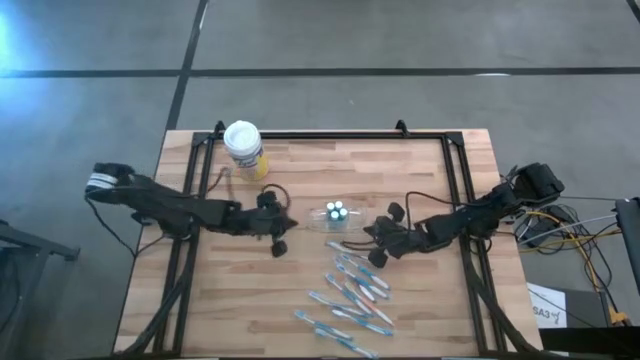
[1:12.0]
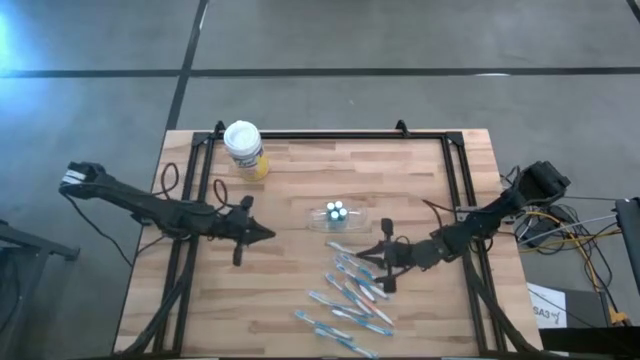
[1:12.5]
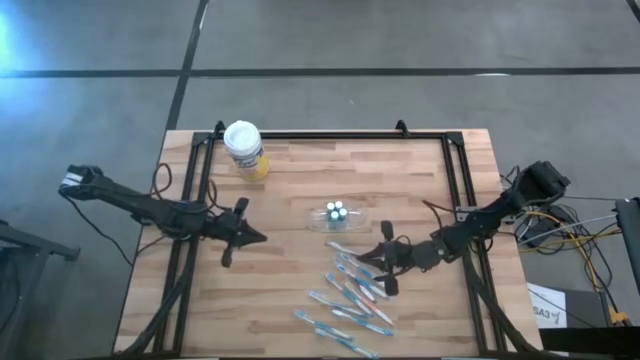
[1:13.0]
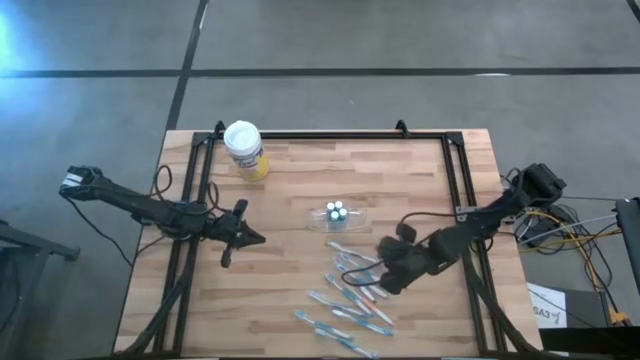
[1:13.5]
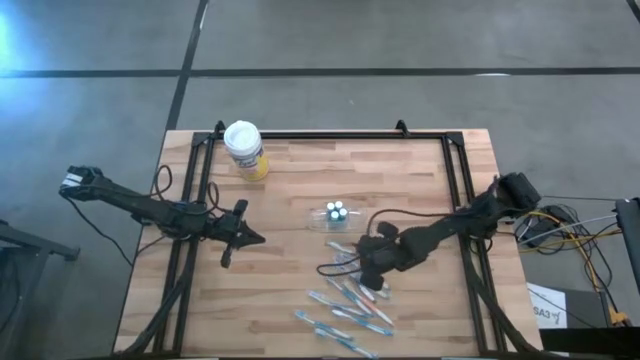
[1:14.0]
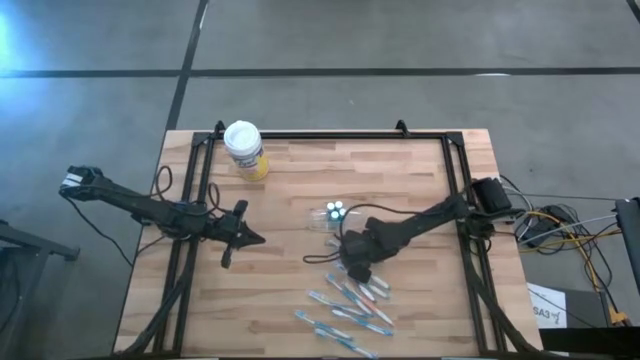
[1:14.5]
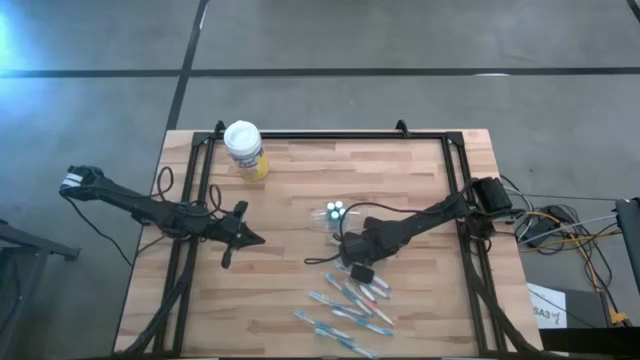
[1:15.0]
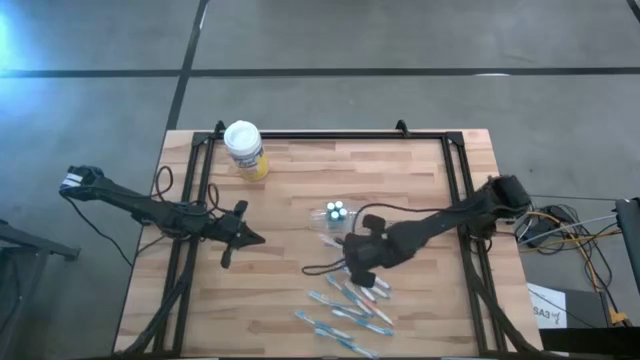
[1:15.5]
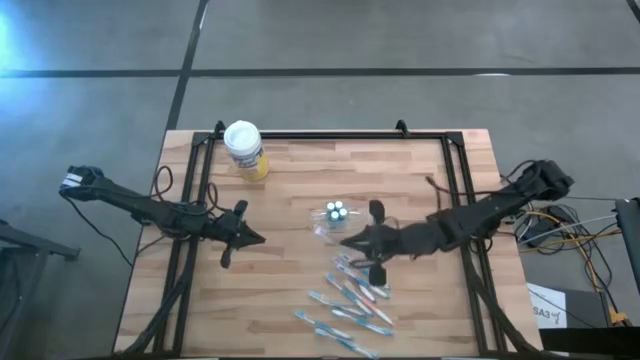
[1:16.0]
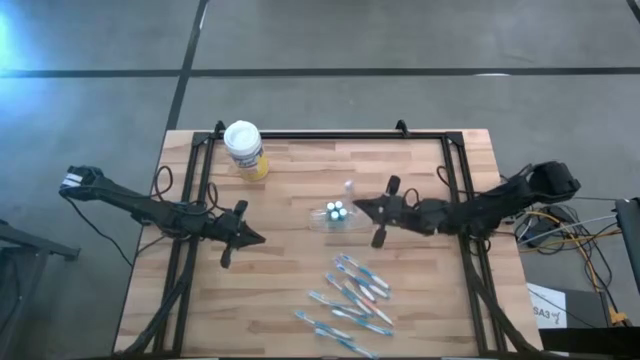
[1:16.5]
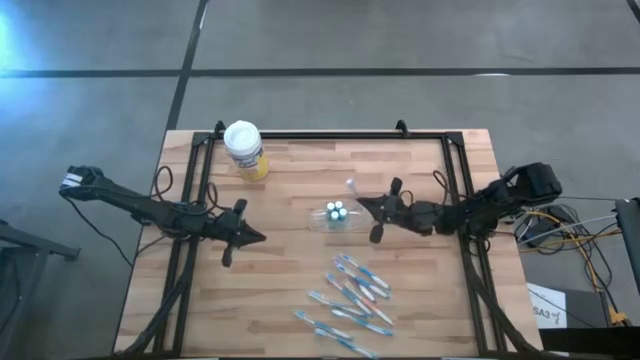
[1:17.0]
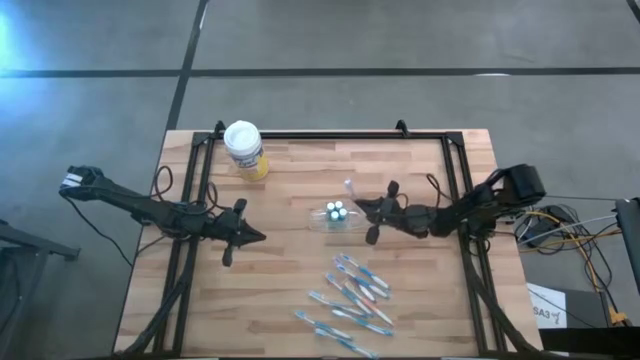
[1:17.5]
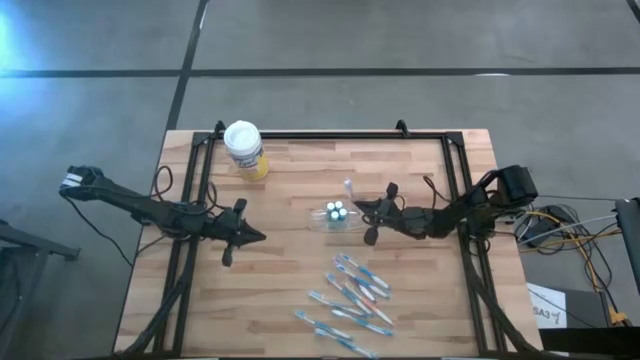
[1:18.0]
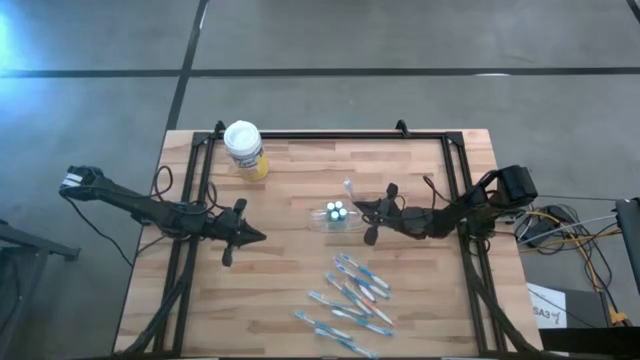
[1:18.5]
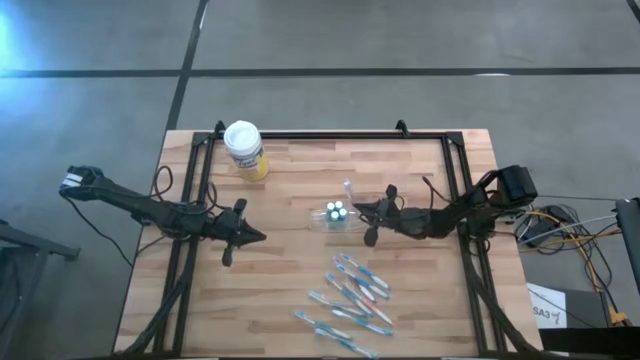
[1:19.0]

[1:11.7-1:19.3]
Task: Pick & Place toothbrushing station
Put the purple toothbrush into the right compartment of the transparent organizer

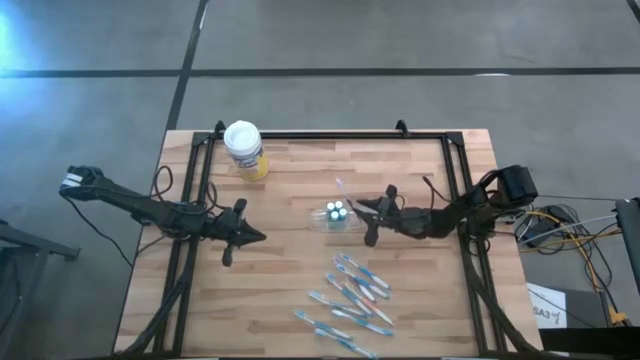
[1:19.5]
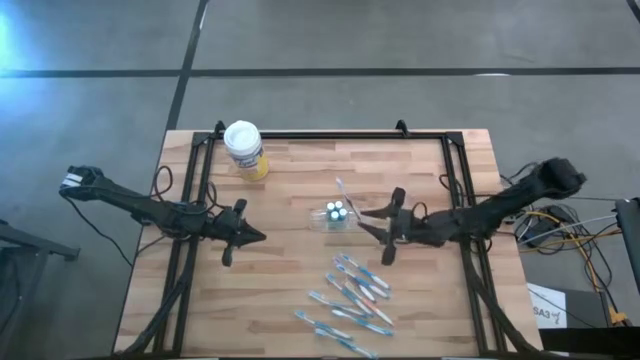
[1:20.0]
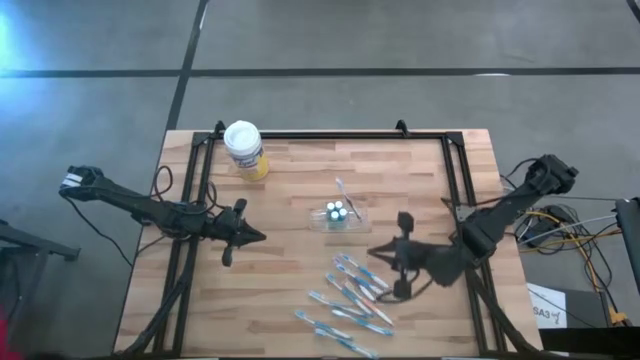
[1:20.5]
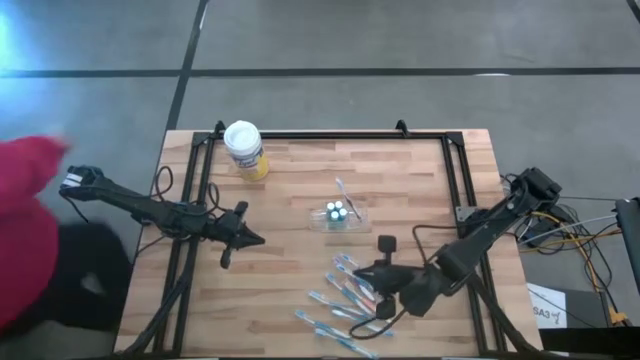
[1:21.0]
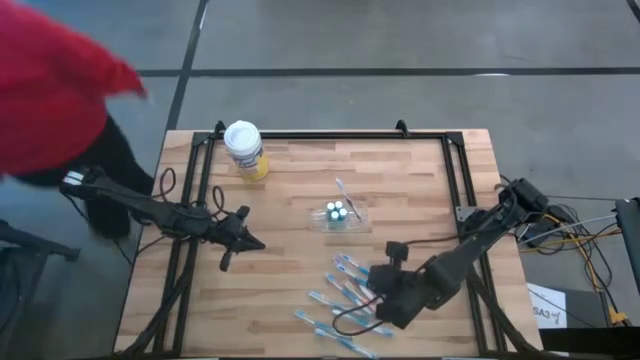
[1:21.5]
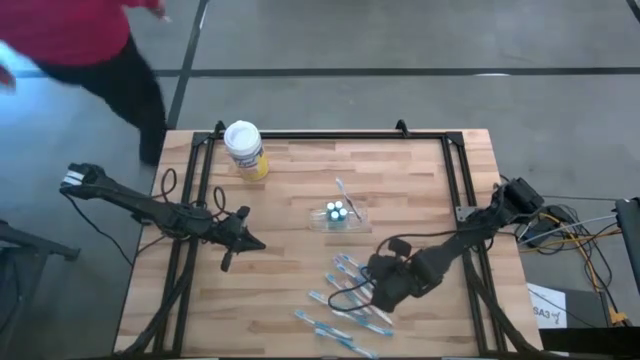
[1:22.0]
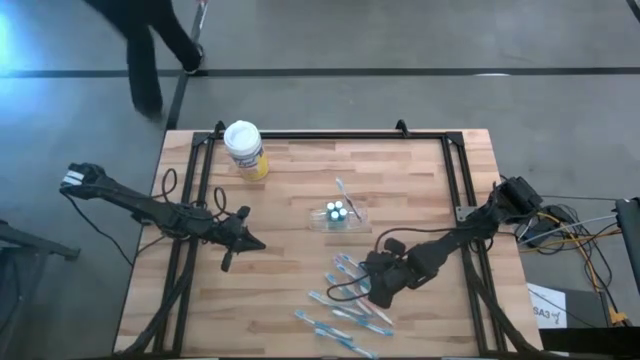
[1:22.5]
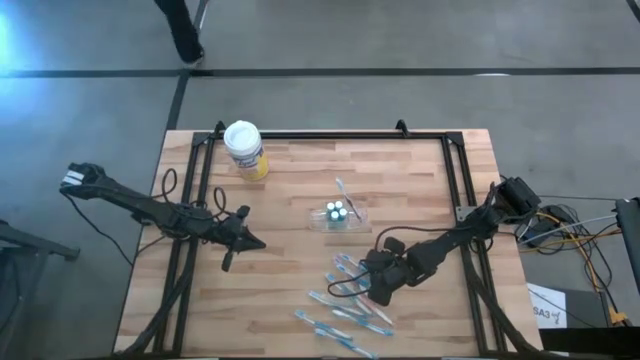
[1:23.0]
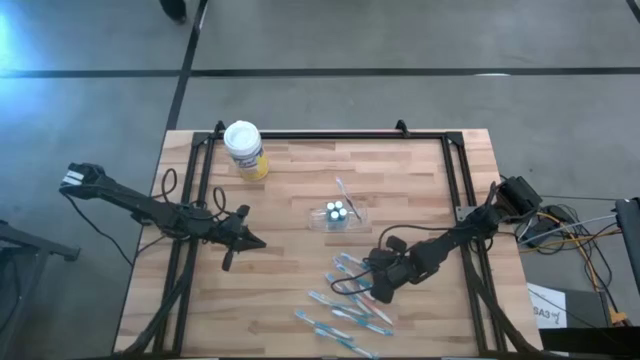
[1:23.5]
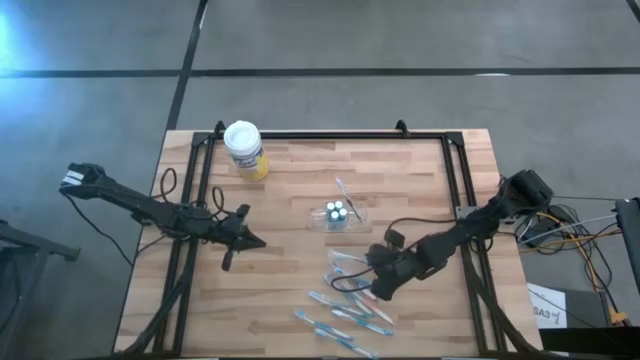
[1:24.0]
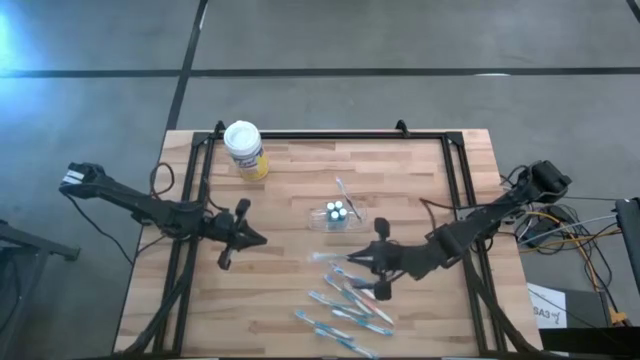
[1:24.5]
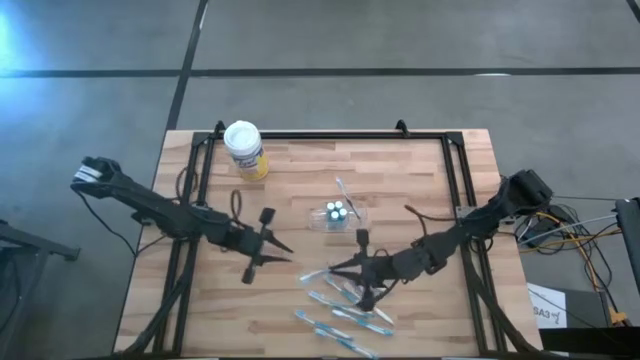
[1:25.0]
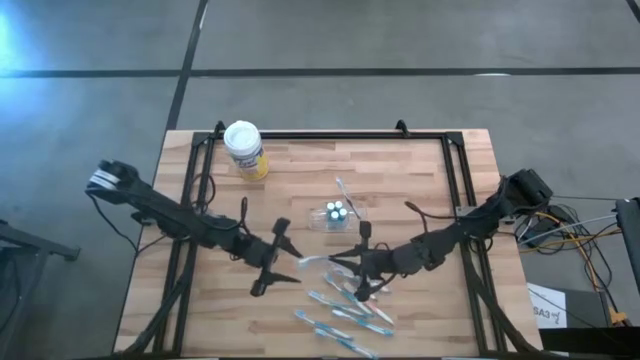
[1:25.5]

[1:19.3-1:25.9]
Put the blue toothbrush into the left compartment of the transparent organizer

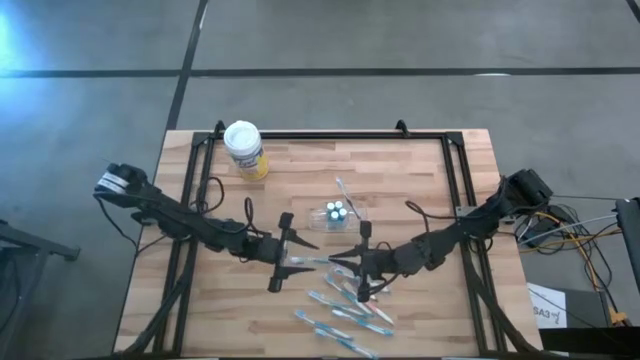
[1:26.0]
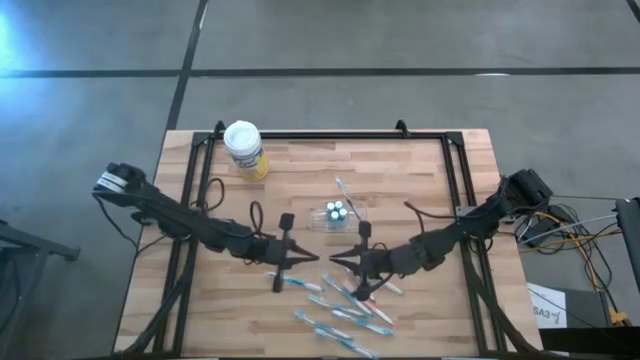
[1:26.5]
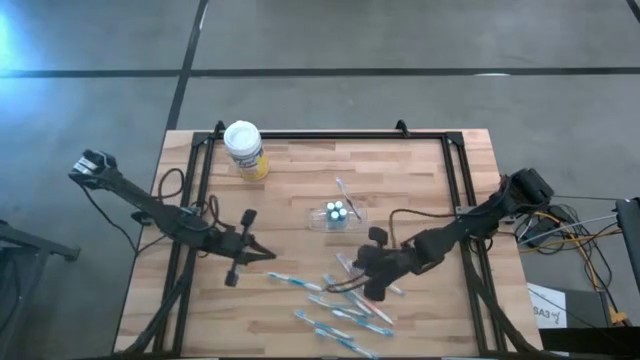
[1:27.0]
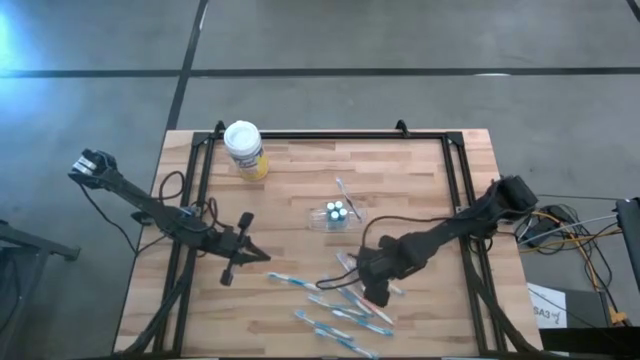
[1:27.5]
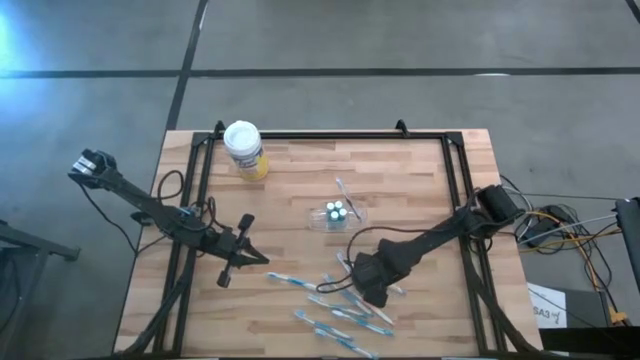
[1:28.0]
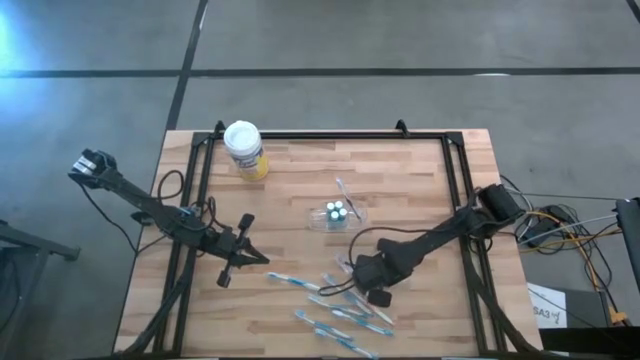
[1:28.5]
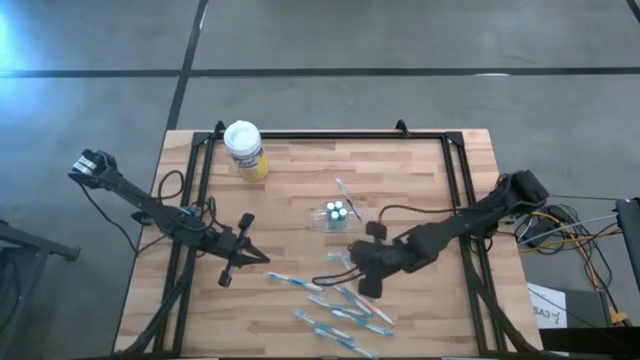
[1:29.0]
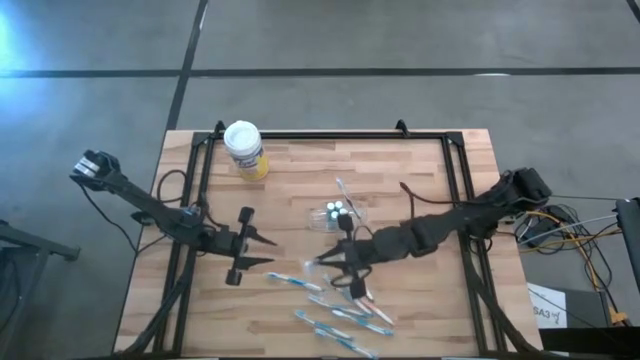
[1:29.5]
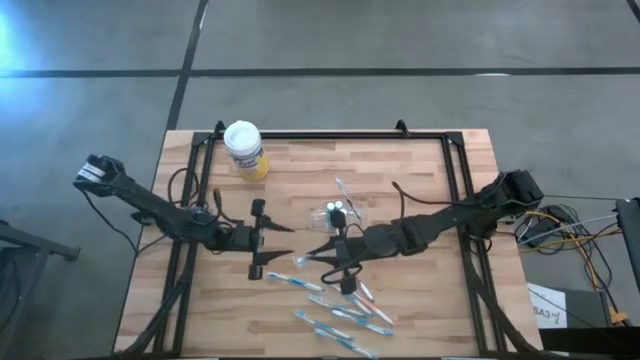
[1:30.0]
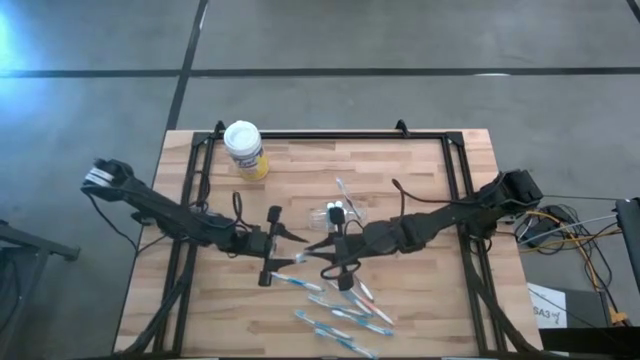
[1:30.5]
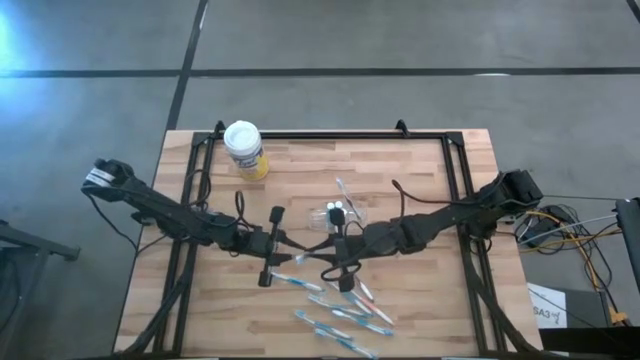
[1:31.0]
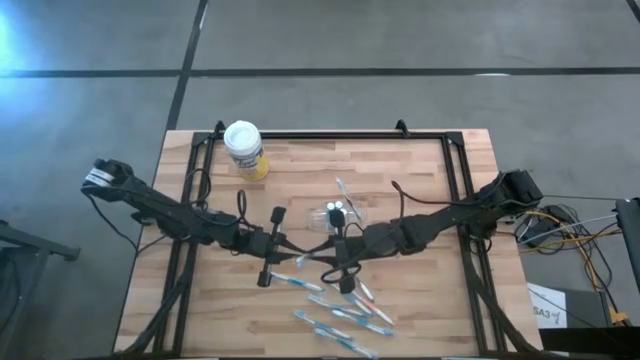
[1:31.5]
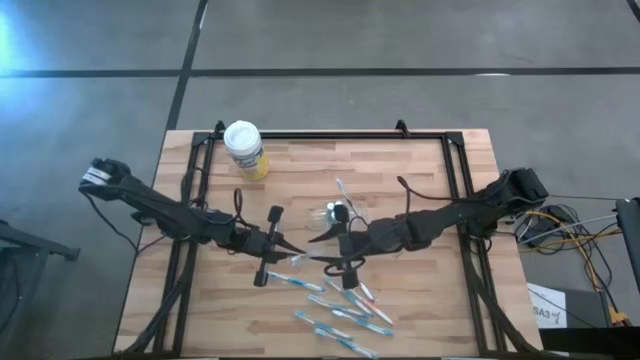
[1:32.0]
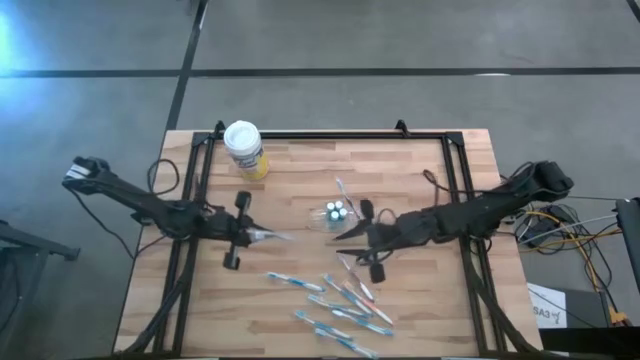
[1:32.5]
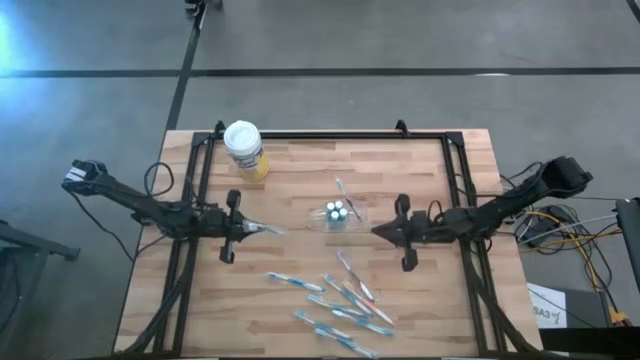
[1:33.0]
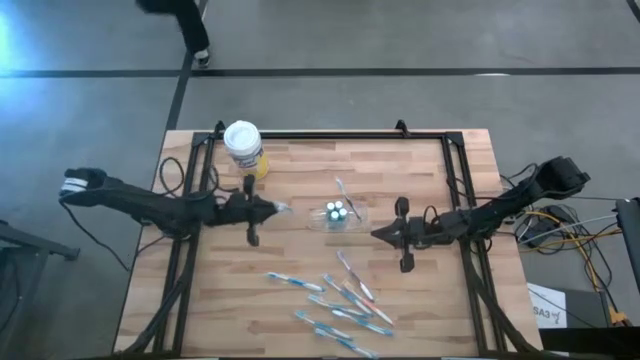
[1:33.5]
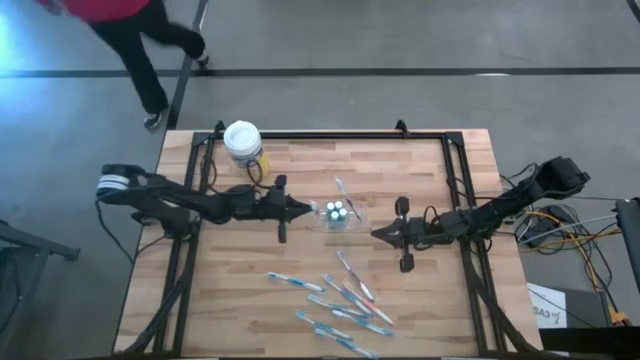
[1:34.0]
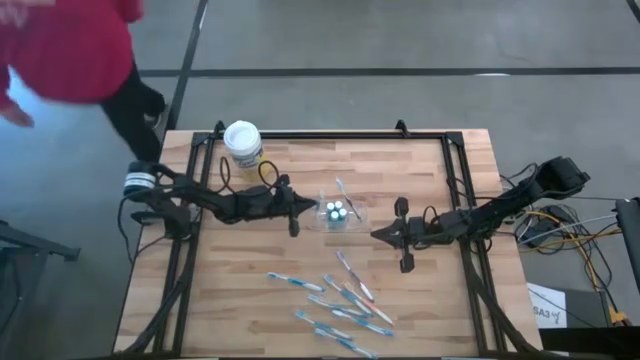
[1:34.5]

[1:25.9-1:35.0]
Put the blue toothbrush into the left compartment of the transparent organizer
